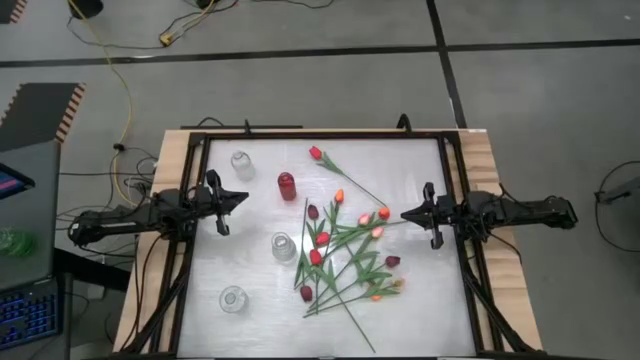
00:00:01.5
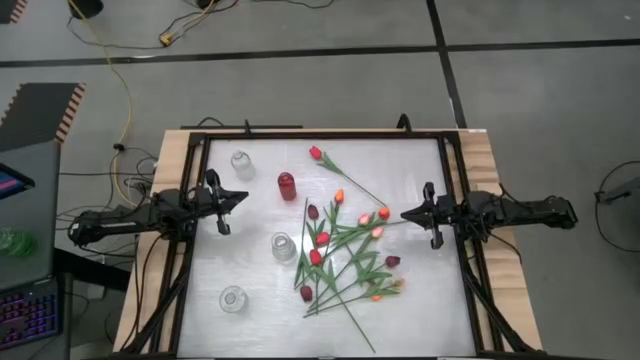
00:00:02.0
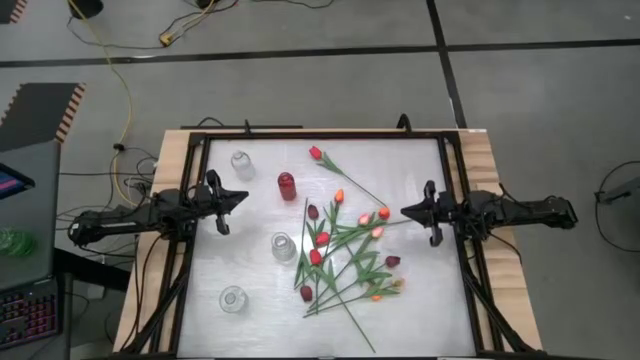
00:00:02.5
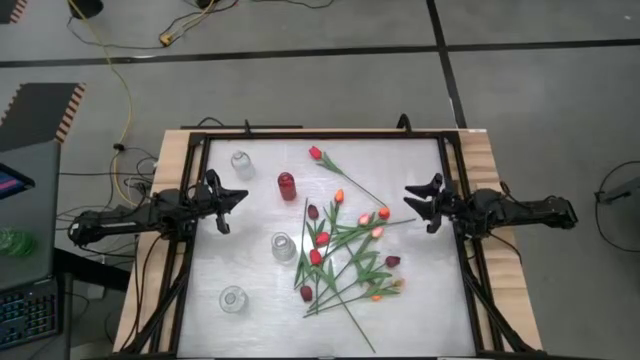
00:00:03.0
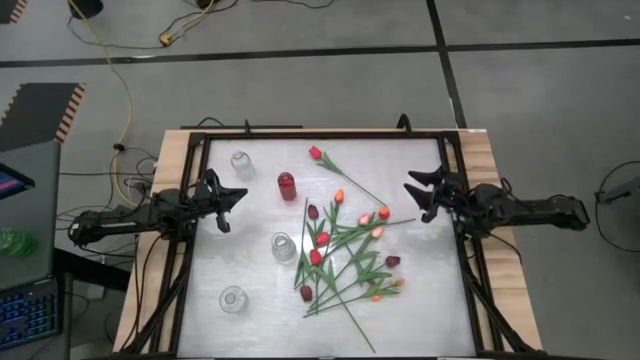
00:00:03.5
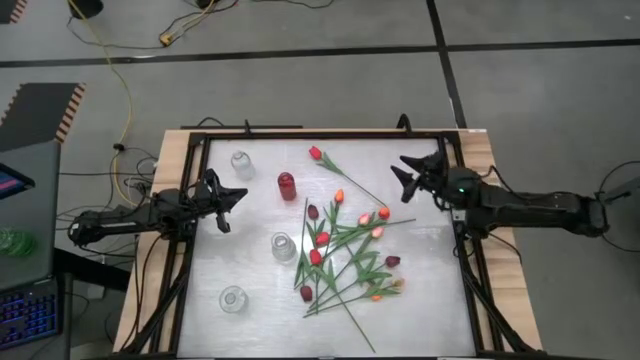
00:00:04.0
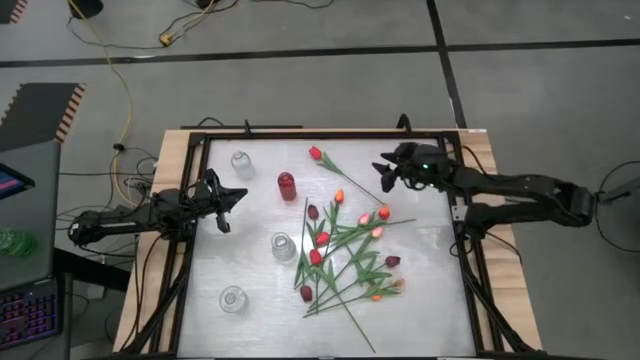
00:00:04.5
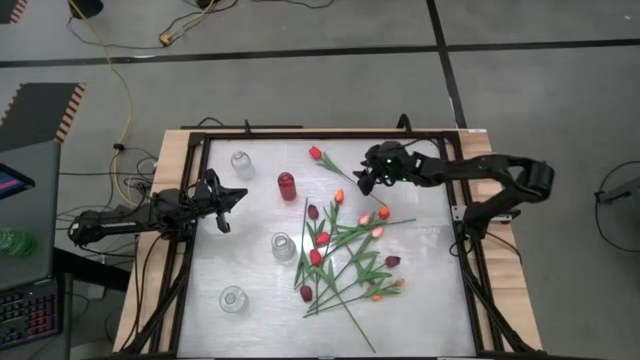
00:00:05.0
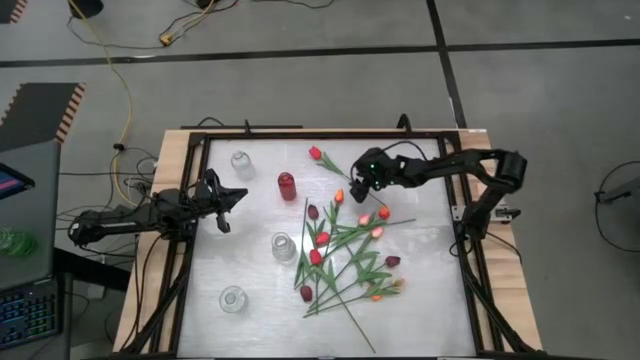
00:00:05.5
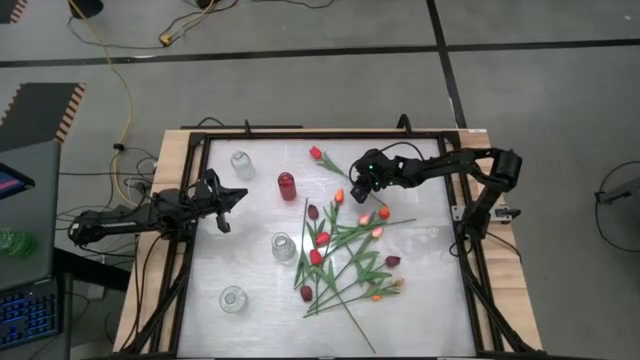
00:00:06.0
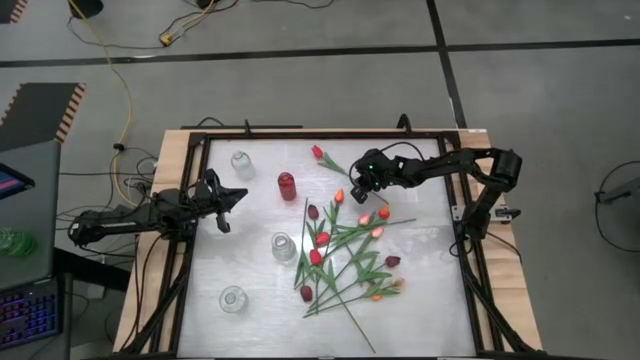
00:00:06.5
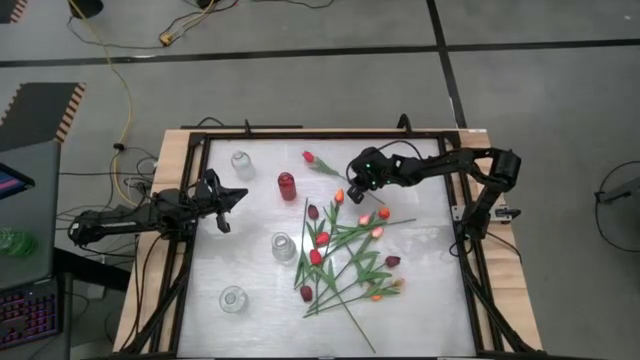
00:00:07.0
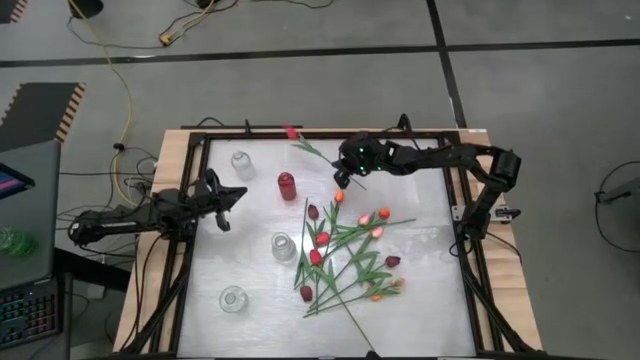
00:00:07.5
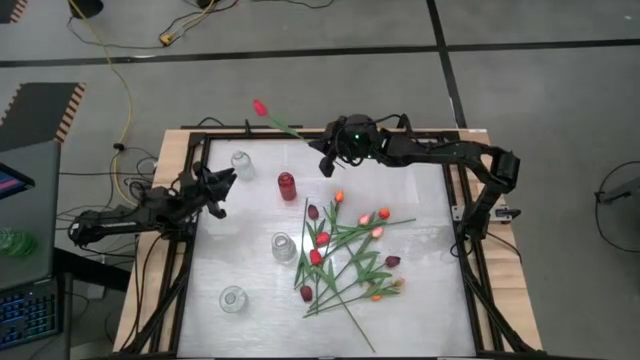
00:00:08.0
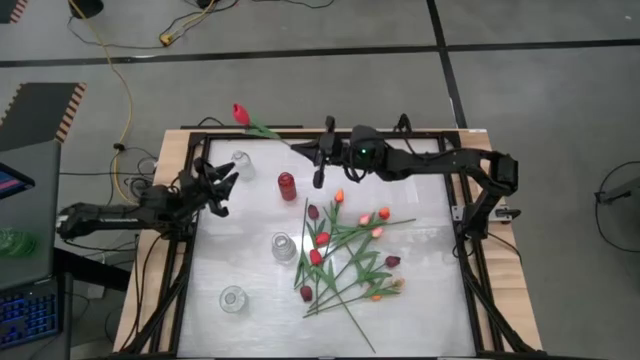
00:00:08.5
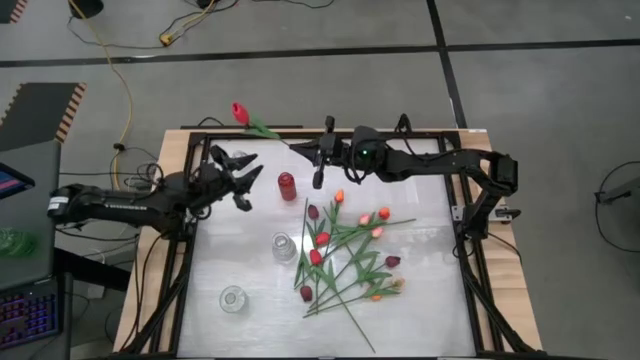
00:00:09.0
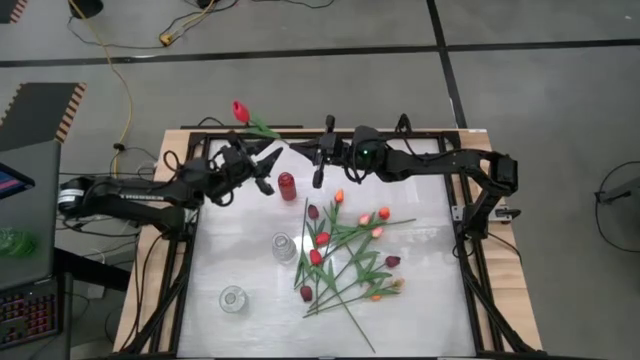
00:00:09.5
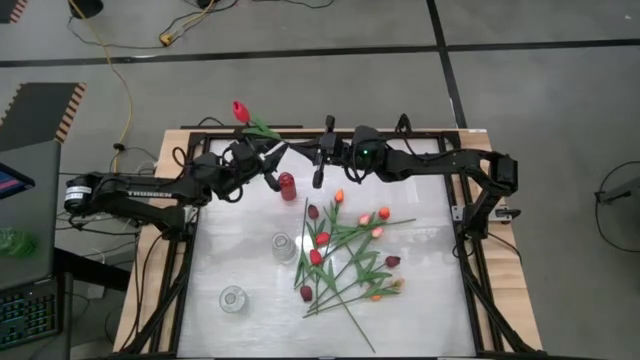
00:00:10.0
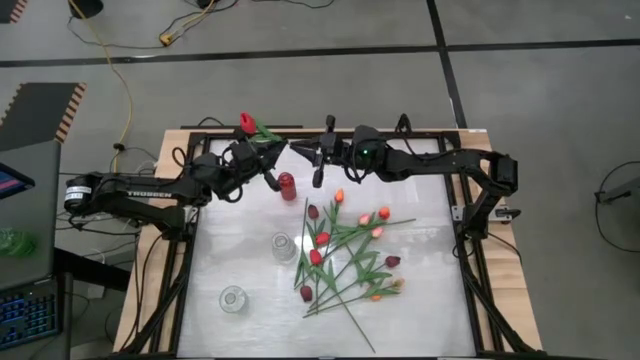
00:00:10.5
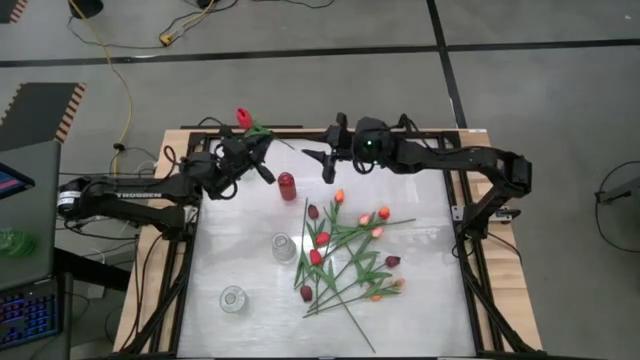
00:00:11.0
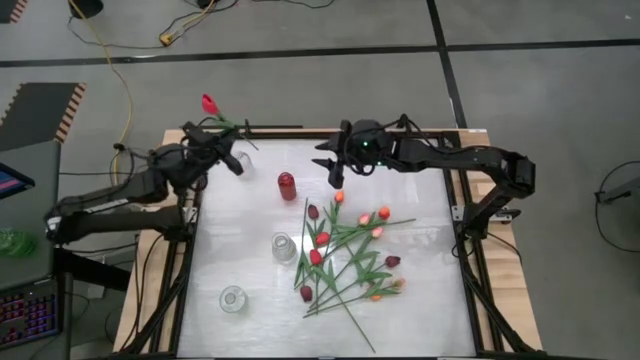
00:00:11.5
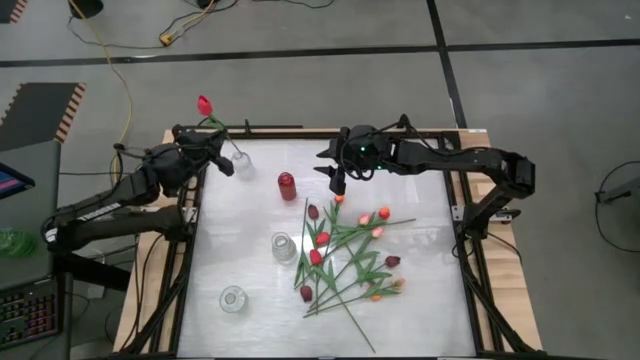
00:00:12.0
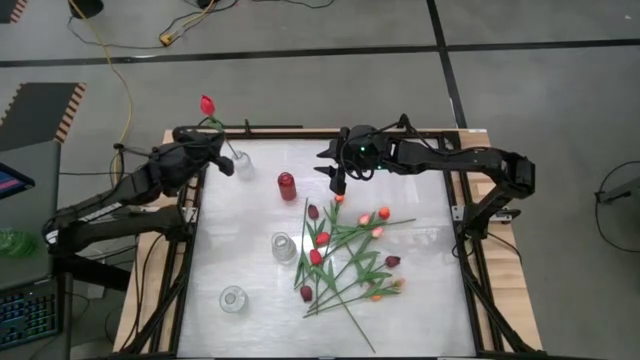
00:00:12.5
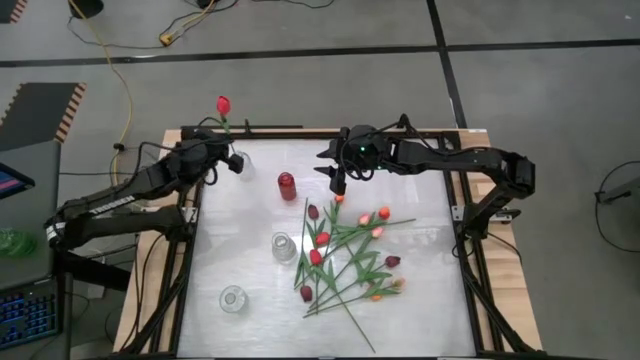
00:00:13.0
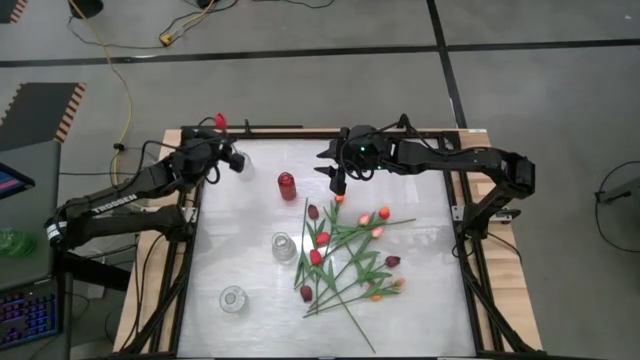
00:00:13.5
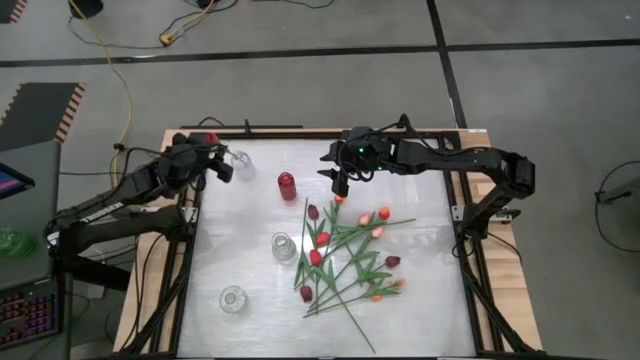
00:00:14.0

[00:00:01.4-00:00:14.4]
Task: Sort flowers into vase by color
Put the red tulip into the top transparent vase

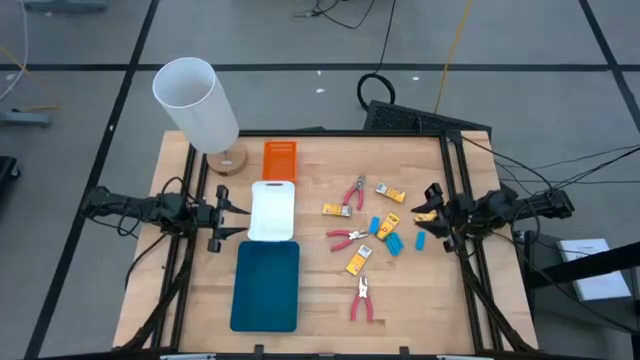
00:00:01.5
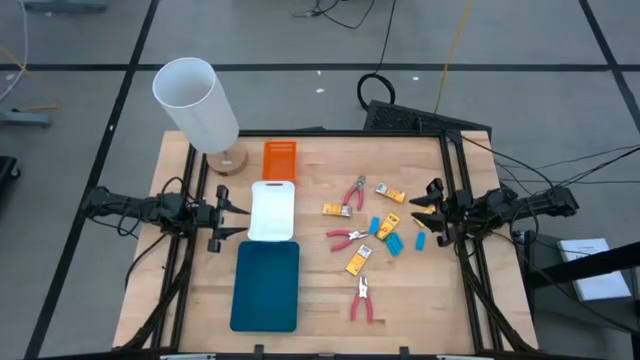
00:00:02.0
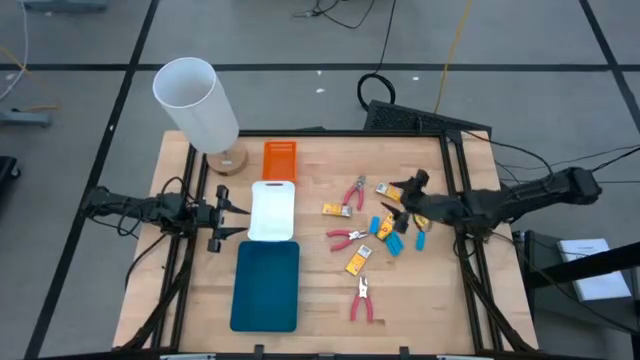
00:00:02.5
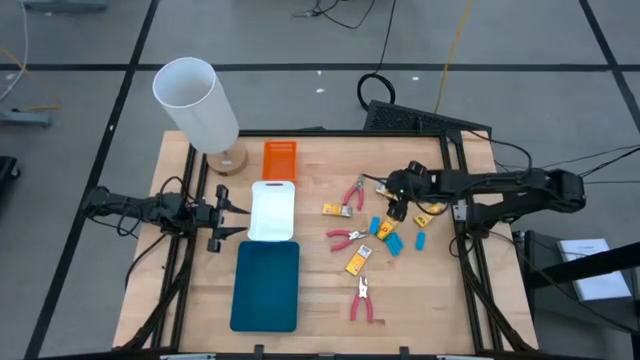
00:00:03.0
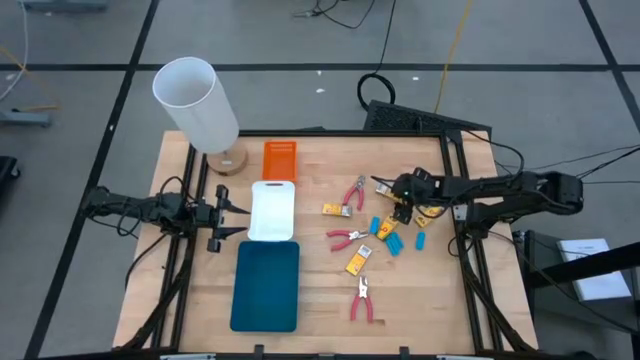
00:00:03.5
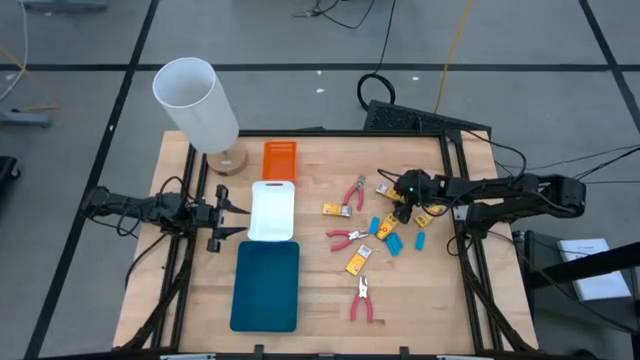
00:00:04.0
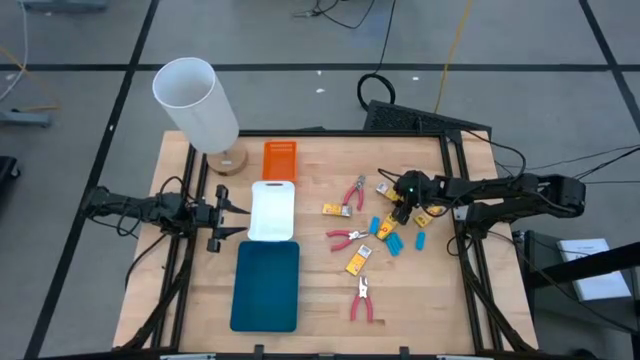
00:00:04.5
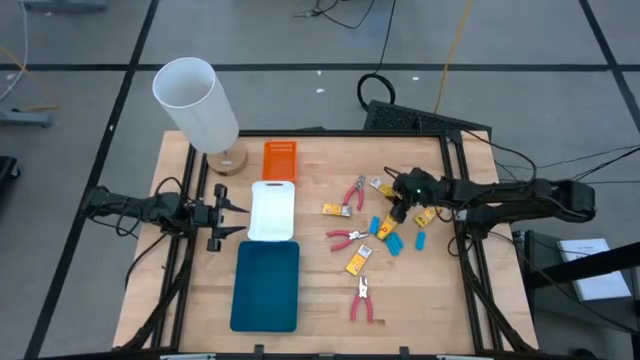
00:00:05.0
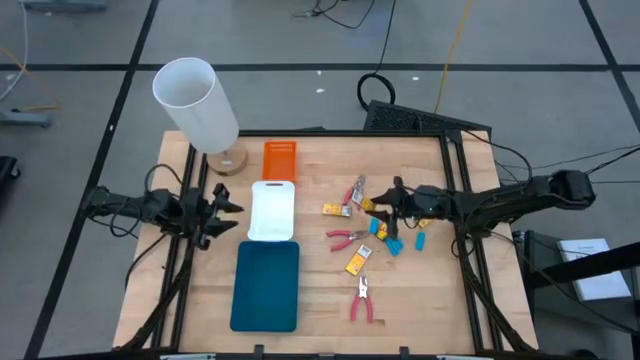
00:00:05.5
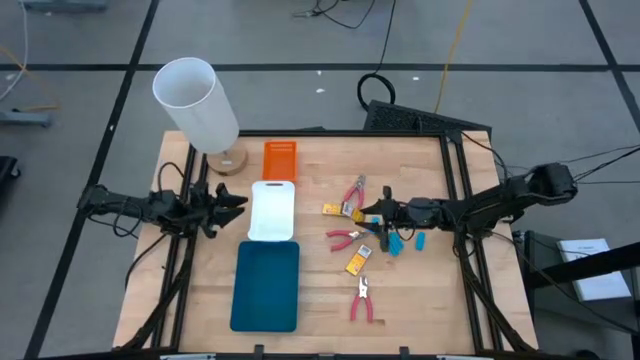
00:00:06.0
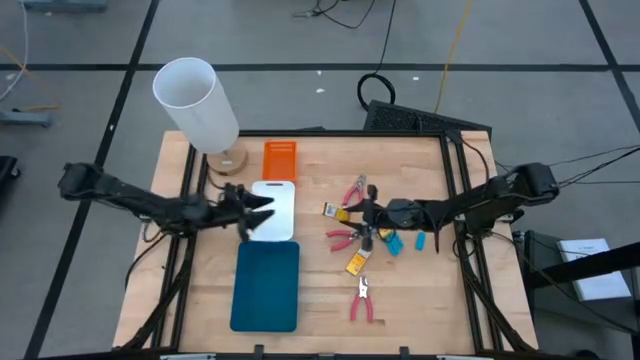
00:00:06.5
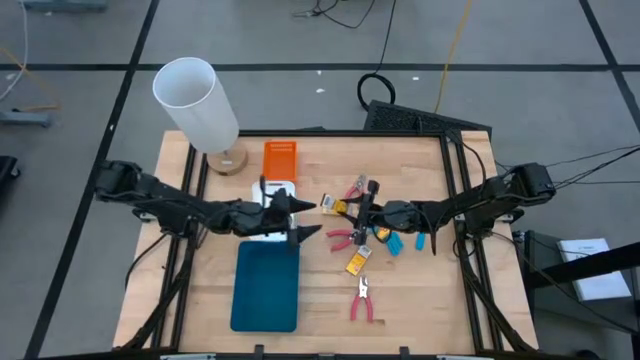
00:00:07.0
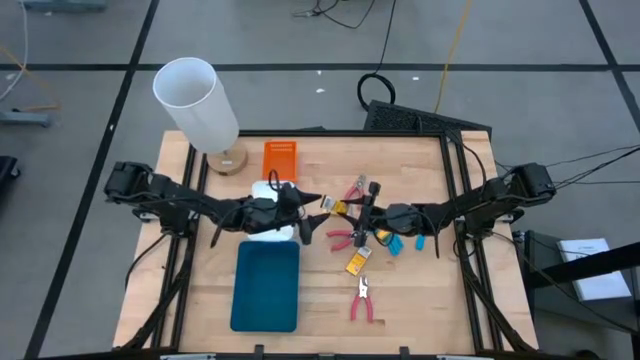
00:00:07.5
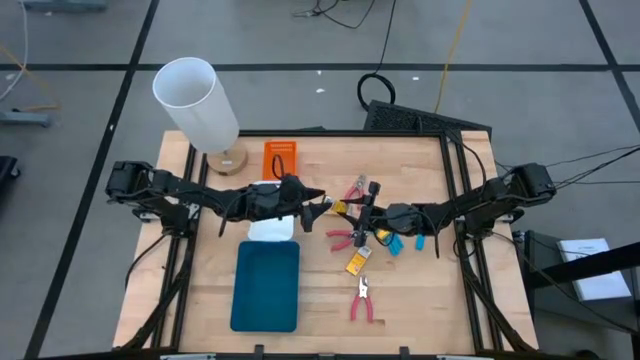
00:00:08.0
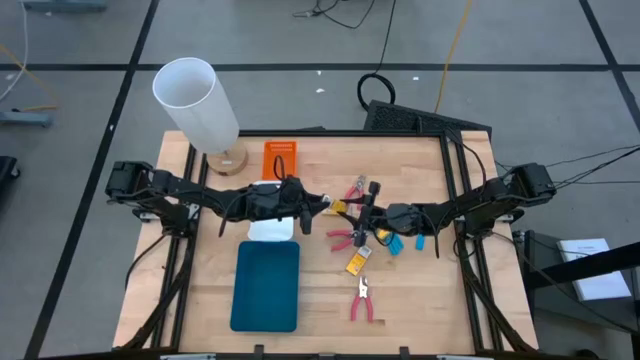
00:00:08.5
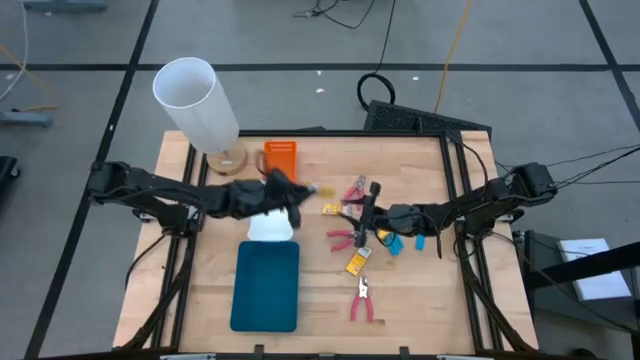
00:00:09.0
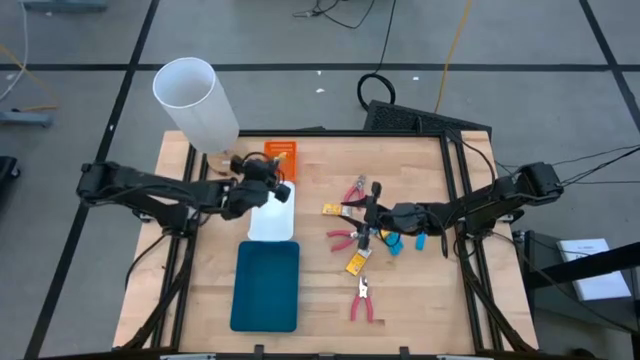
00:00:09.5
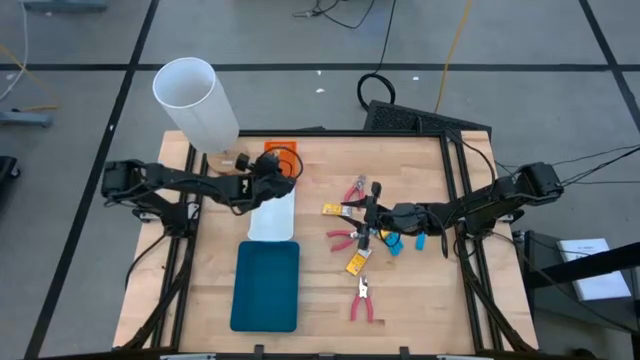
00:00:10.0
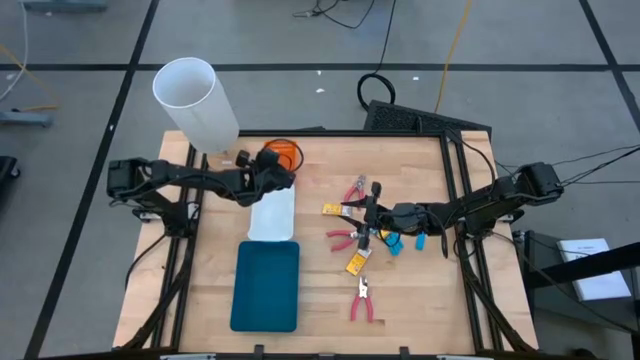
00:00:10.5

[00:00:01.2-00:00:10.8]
Task: Pick & Place School Supplies
Put the yellow crayon box into the orange bin
